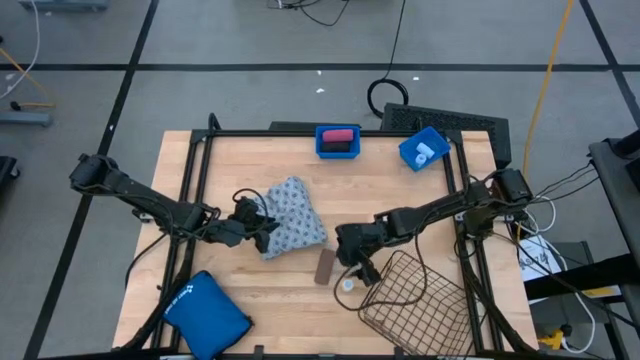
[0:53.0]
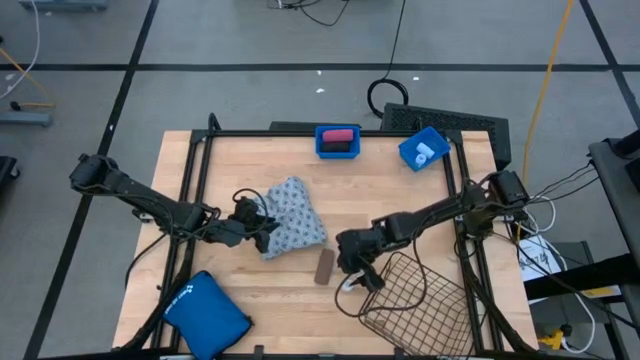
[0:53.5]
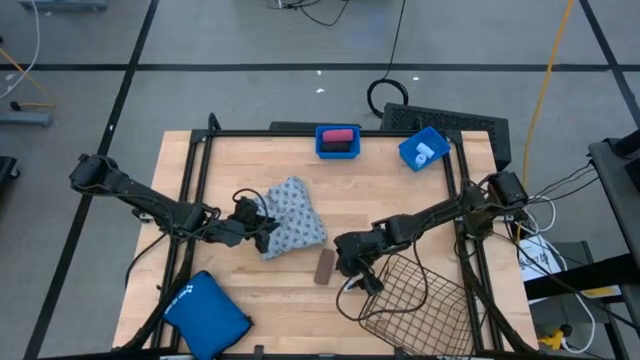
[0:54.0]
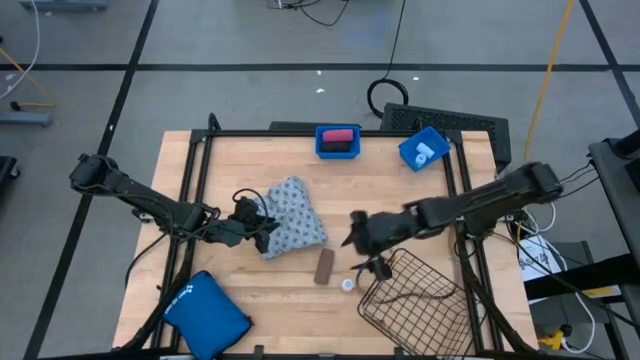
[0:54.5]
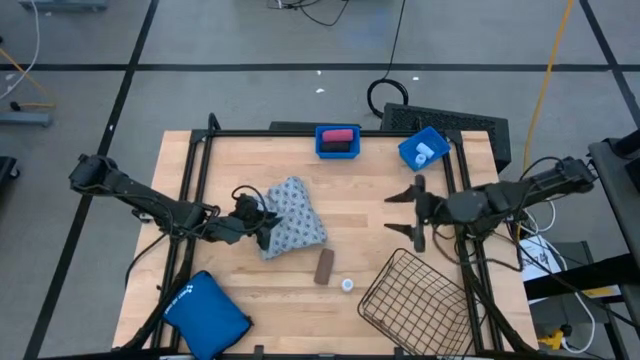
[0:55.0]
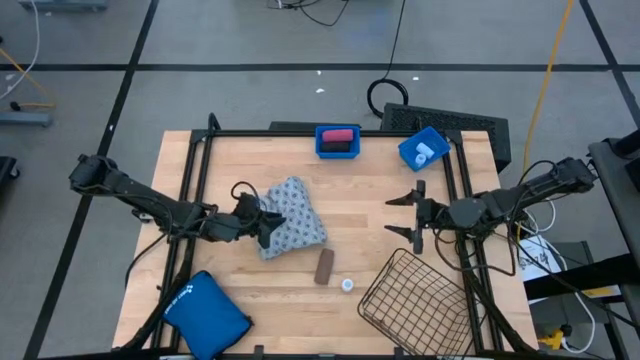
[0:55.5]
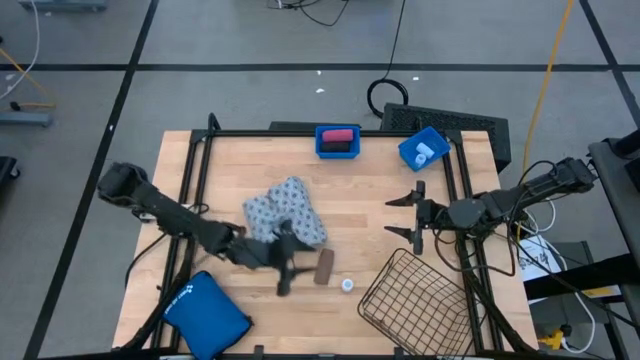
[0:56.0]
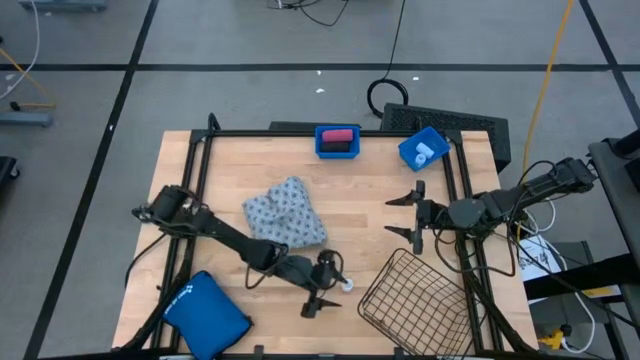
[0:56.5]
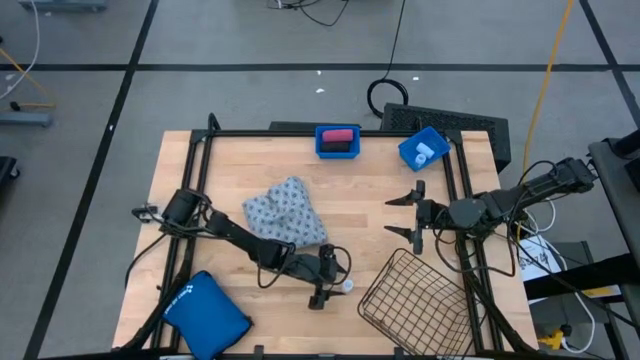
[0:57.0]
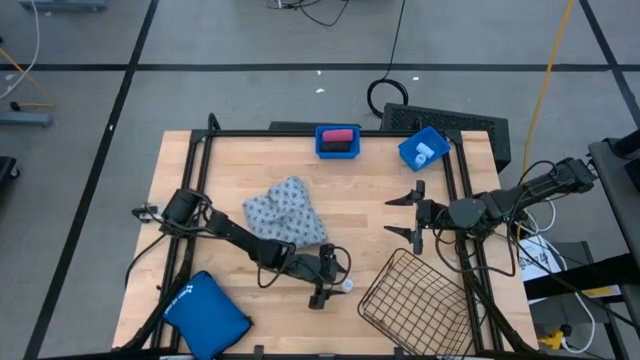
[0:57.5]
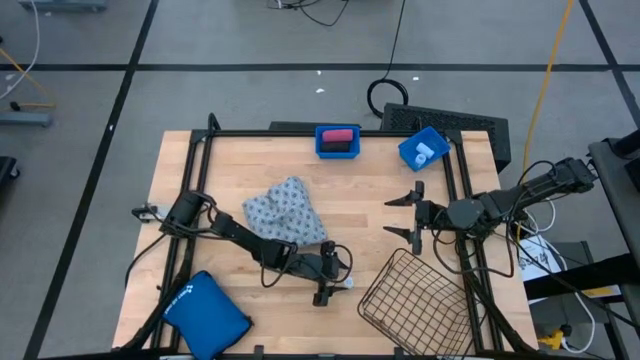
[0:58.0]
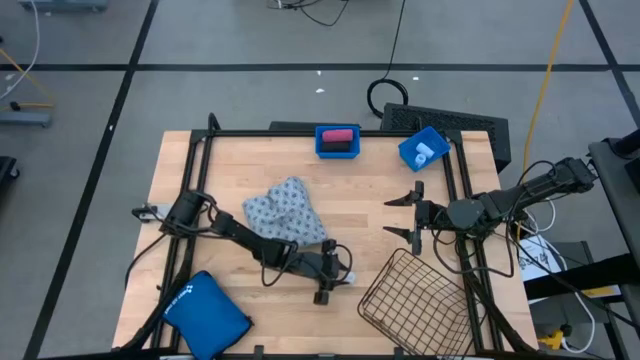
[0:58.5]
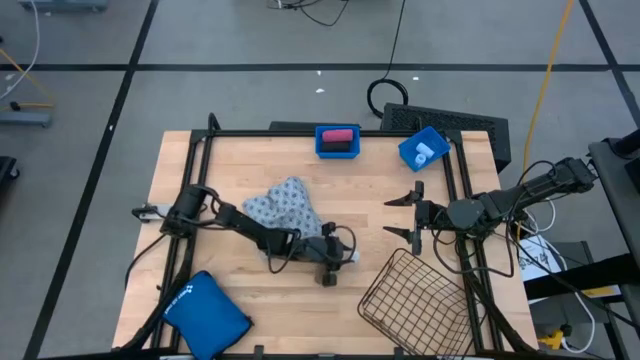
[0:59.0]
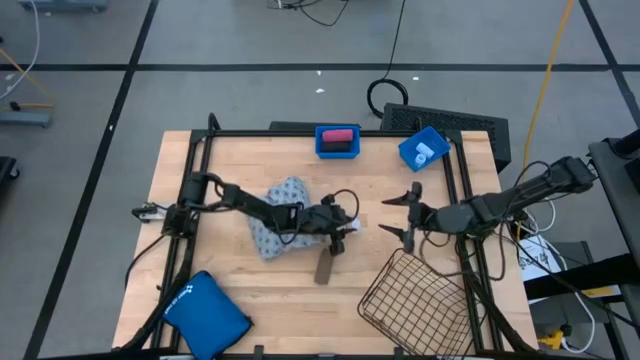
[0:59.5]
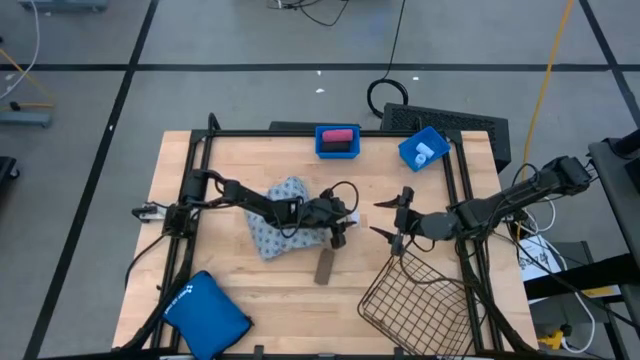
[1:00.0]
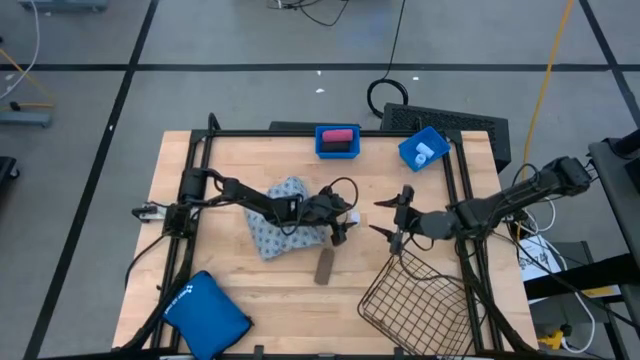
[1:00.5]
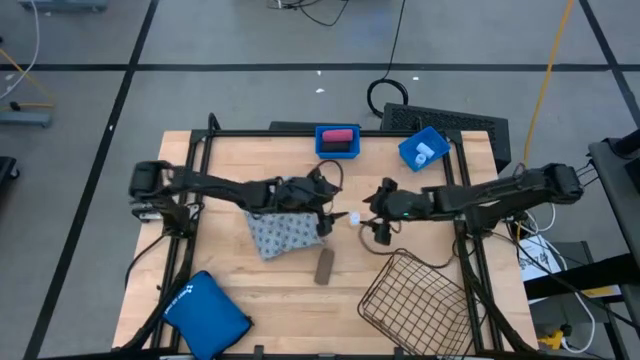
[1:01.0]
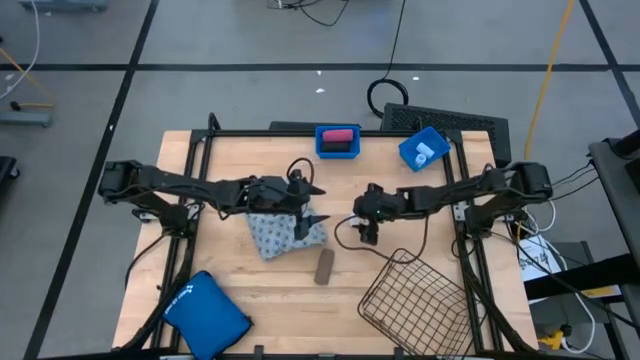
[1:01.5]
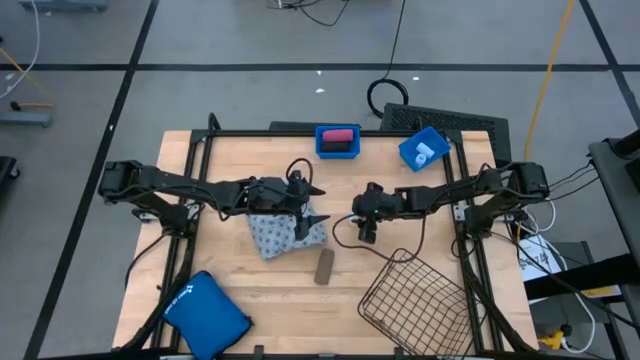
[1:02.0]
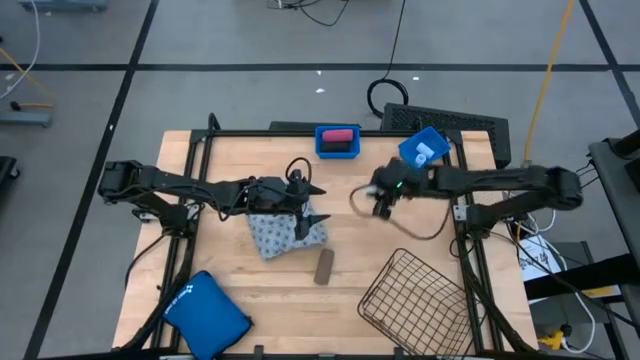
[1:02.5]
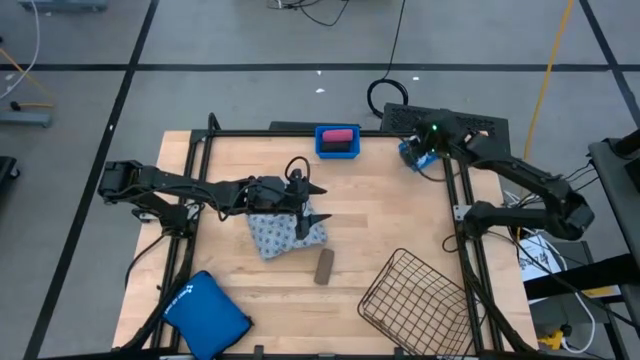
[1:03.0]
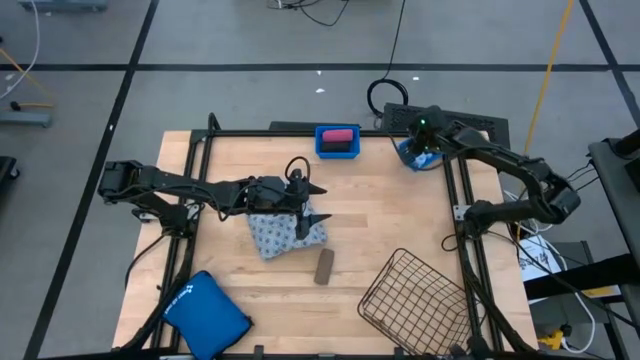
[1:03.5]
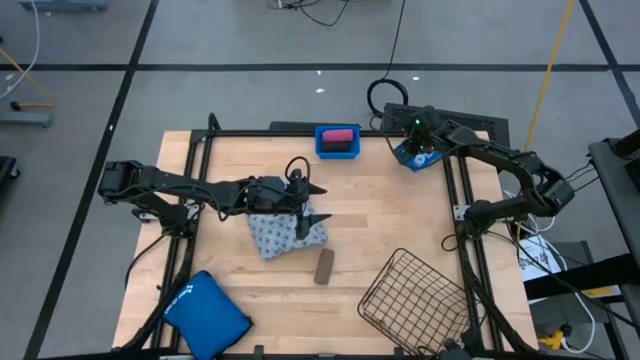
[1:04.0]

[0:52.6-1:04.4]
Task: Pick & Place Medicine items
Put the white medicine bottle into the right blue bin

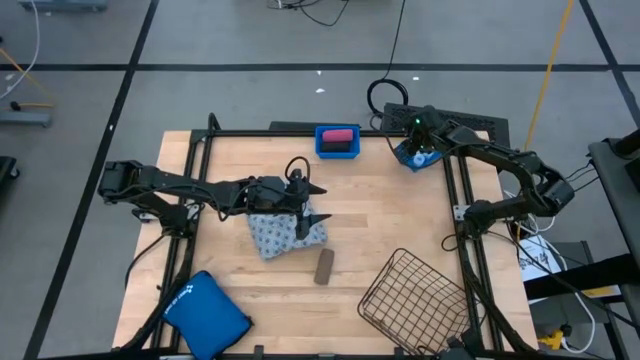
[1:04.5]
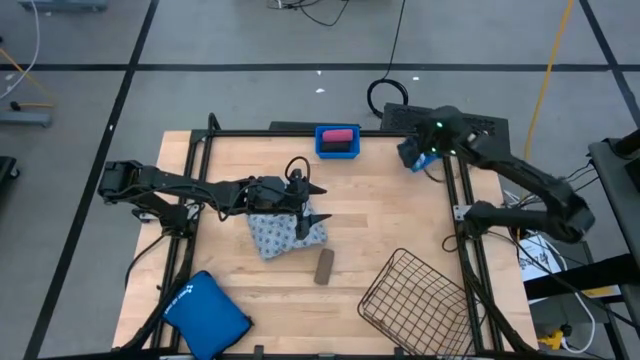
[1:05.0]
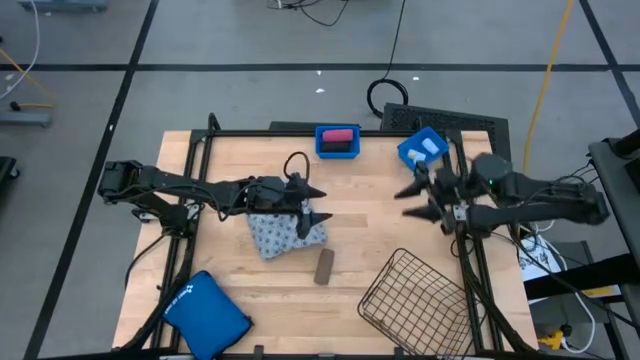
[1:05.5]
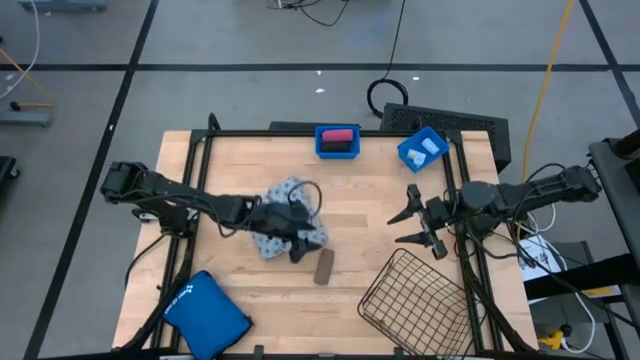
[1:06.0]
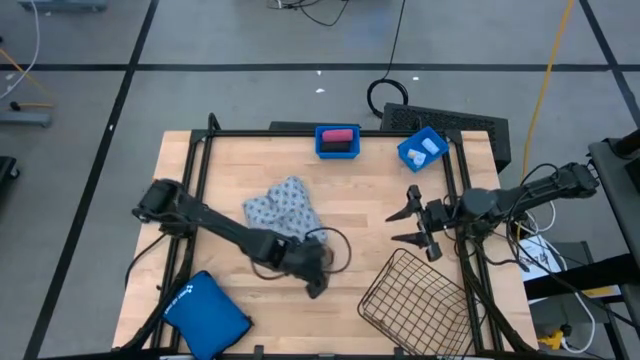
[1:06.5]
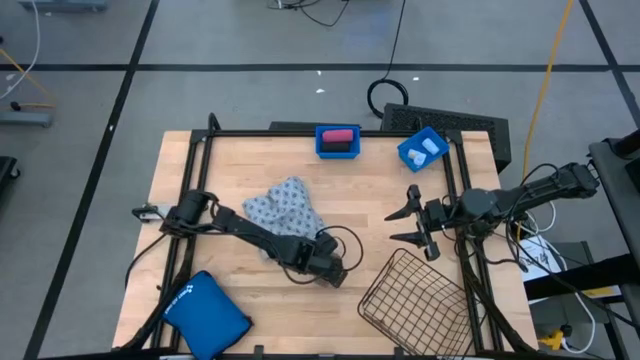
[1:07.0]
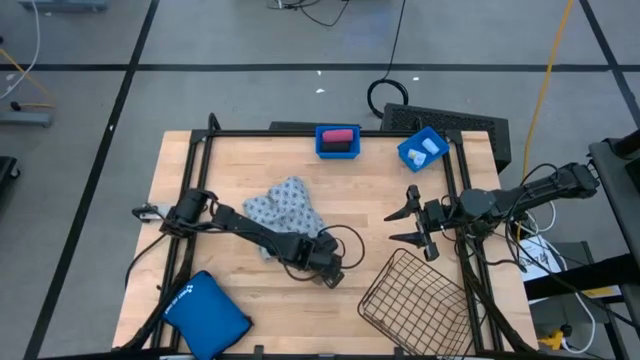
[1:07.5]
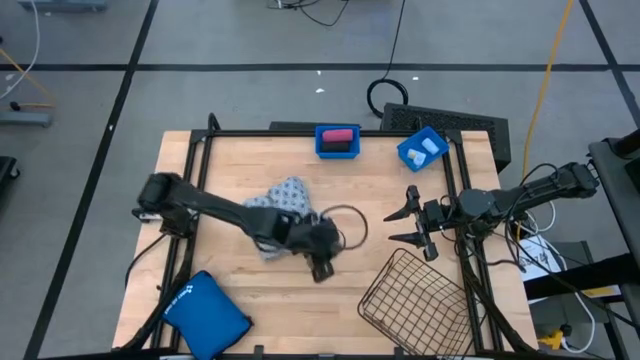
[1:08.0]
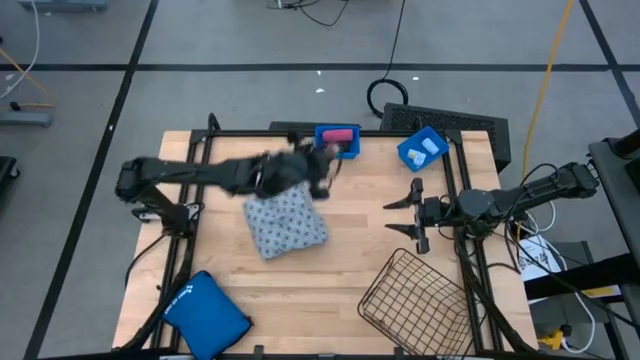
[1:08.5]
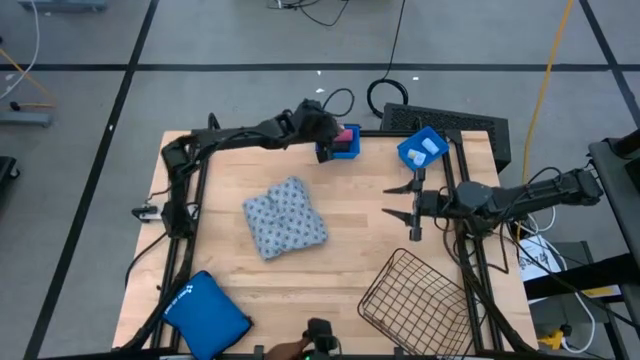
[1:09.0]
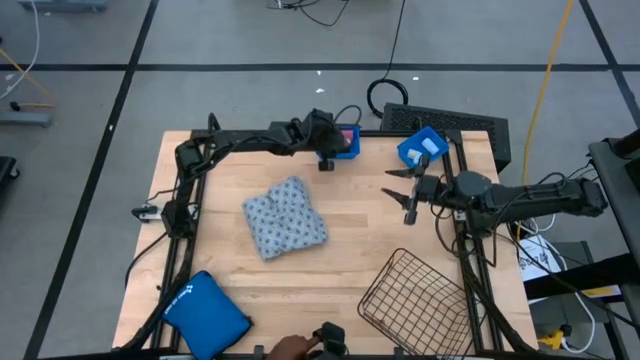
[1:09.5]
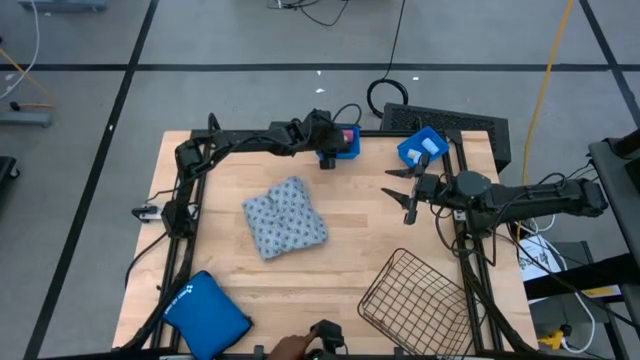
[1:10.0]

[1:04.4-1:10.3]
Put the brown rolled gauze into the left blue bin

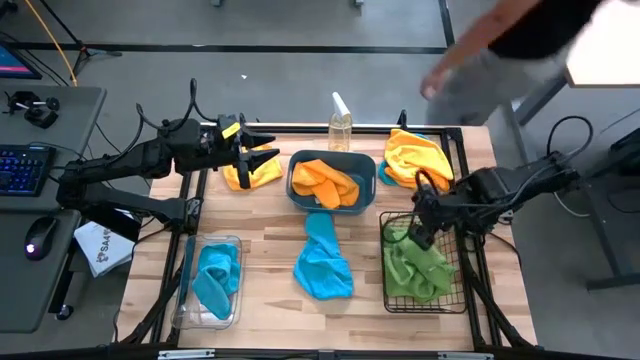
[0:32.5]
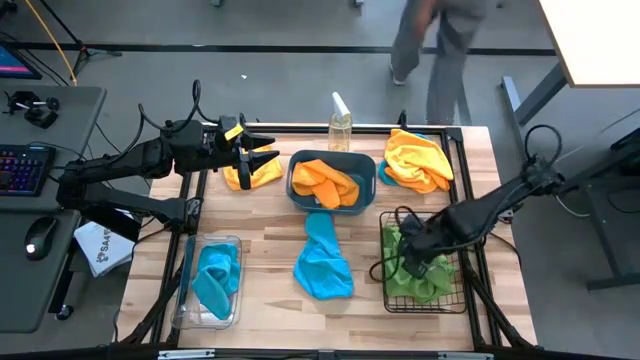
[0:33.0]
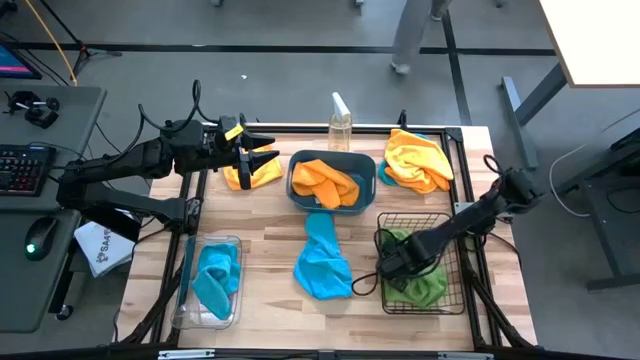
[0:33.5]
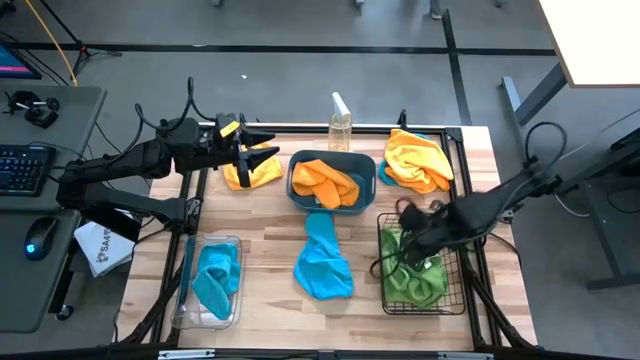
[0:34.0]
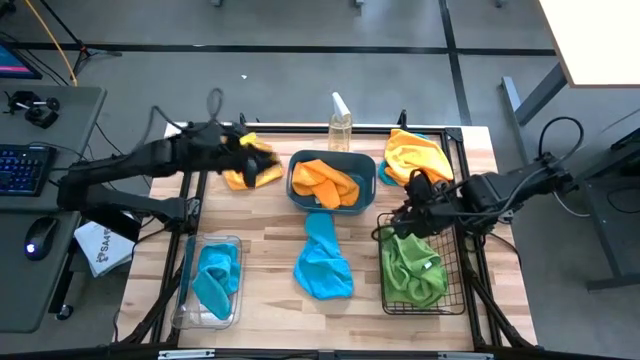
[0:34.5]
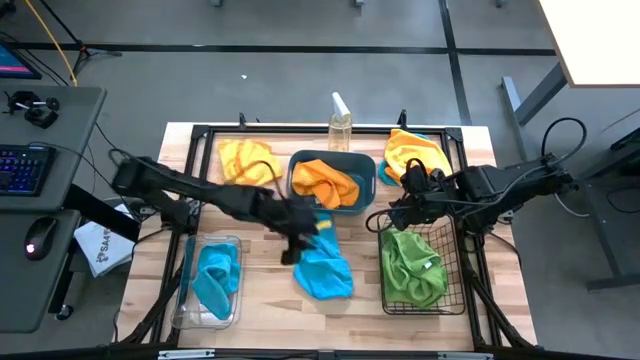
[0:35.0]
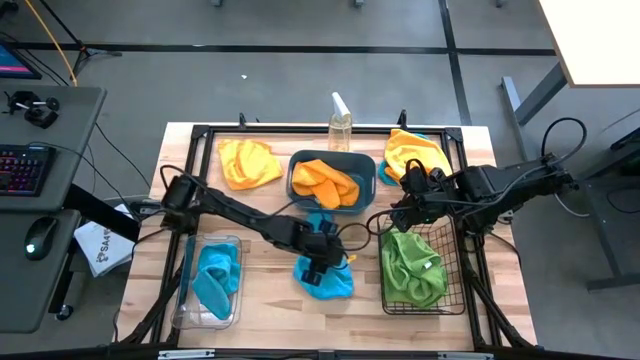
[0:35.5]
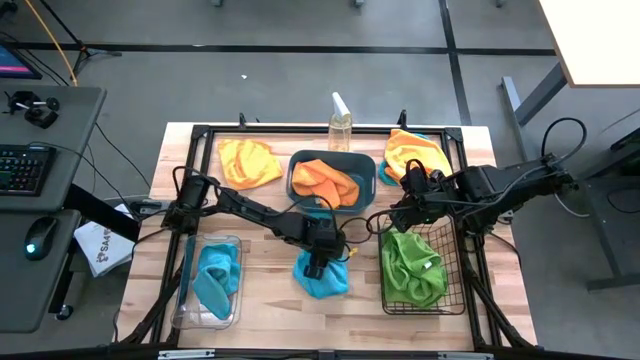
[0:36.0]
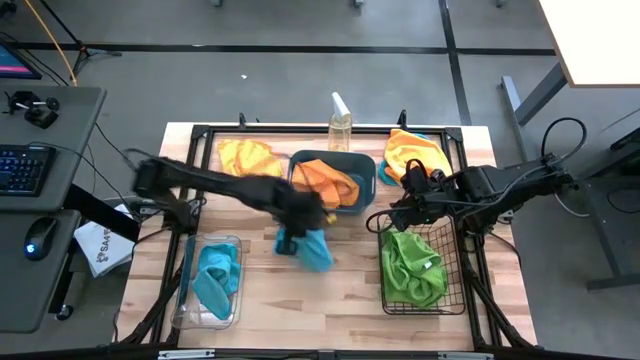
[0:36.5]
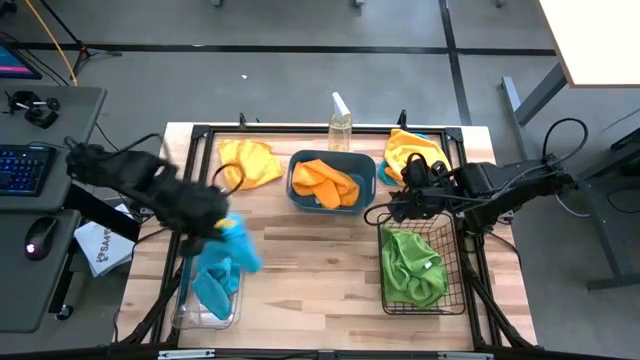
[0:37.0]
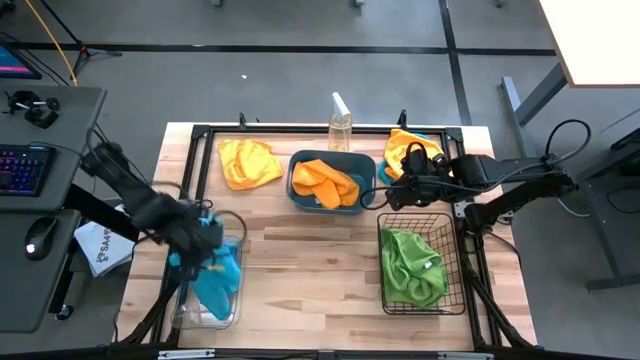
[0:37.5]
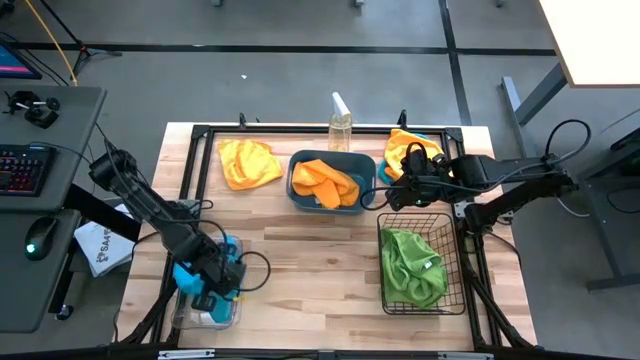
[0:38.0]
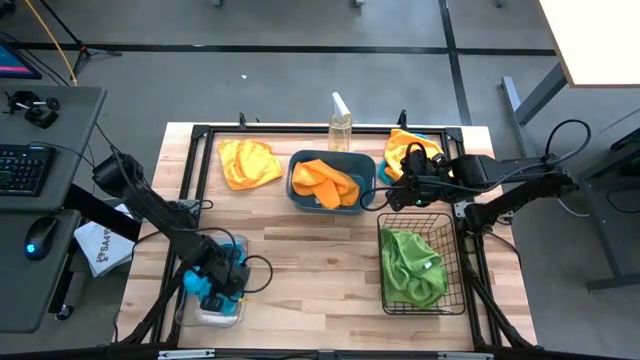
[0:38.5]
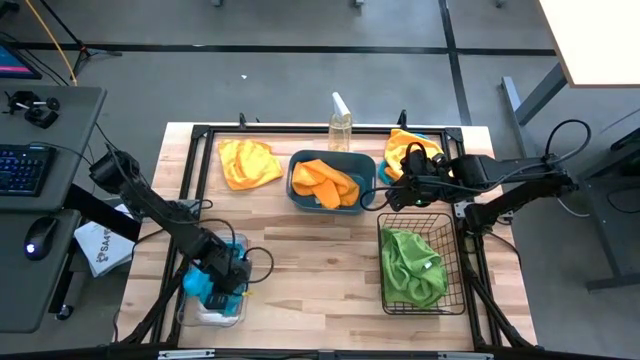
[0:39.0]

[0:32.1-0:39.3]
Task: Sort microfiber towel by color & place in baskets
Put the bottom blue towel into the transparent bin
